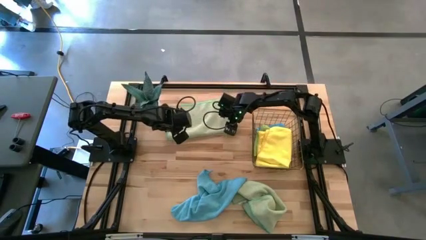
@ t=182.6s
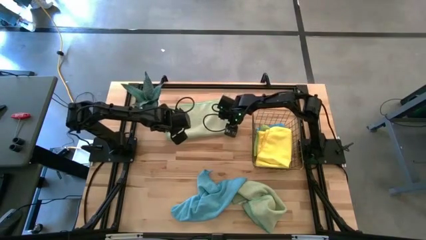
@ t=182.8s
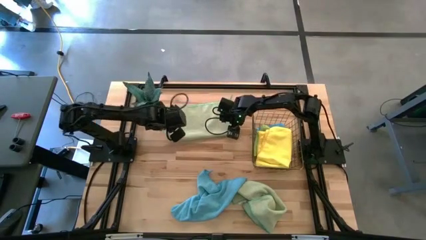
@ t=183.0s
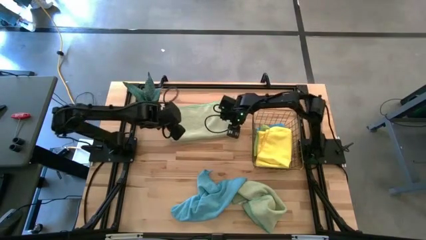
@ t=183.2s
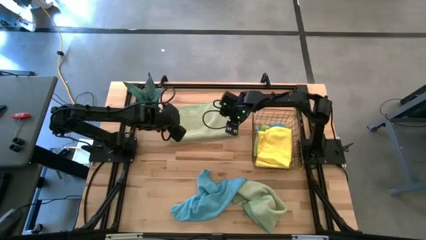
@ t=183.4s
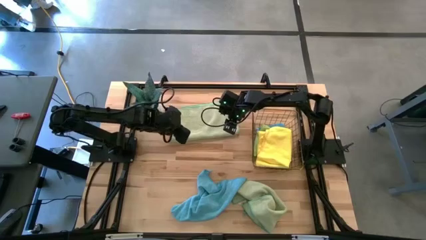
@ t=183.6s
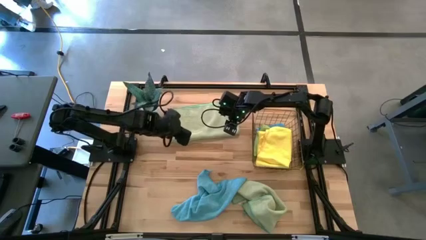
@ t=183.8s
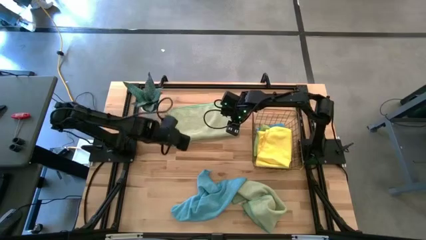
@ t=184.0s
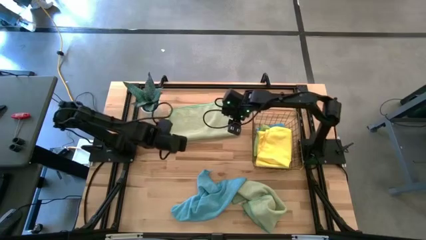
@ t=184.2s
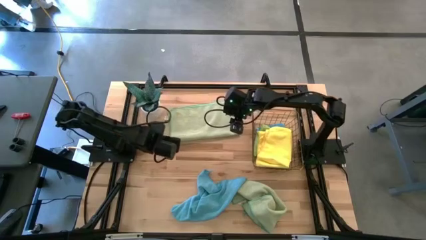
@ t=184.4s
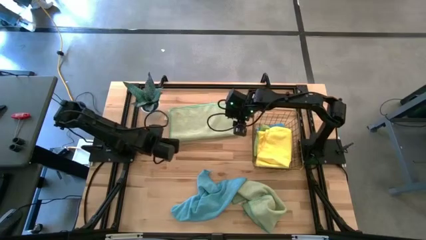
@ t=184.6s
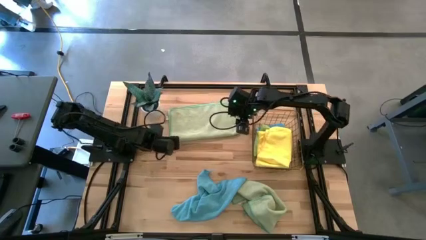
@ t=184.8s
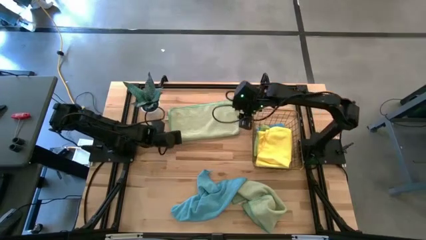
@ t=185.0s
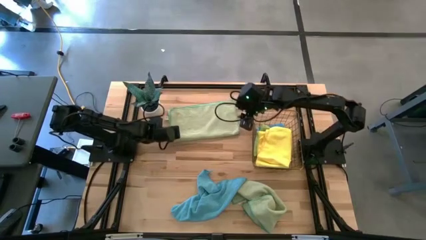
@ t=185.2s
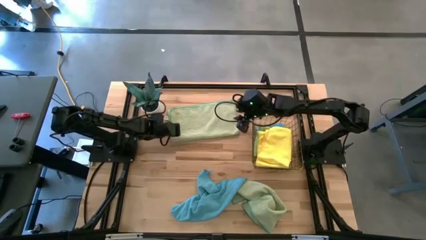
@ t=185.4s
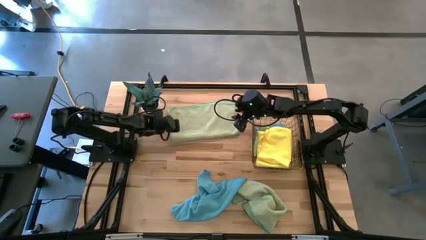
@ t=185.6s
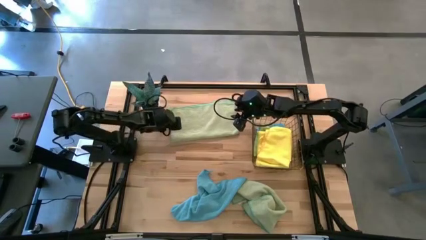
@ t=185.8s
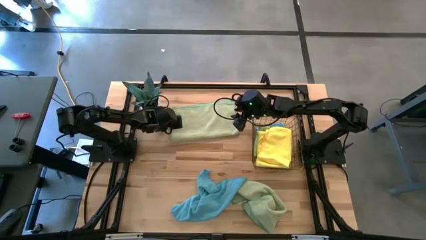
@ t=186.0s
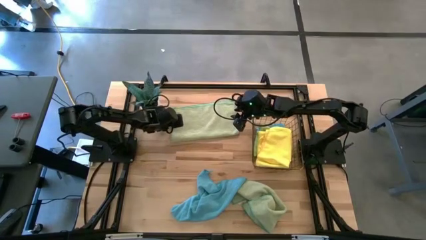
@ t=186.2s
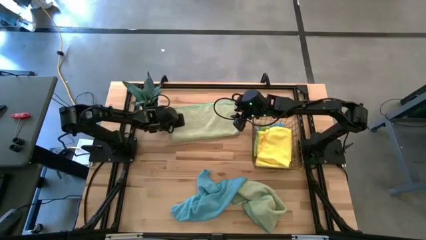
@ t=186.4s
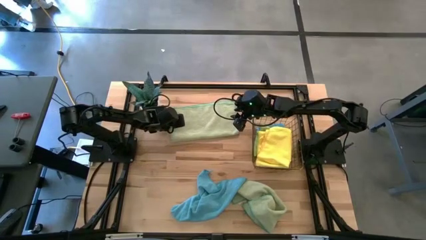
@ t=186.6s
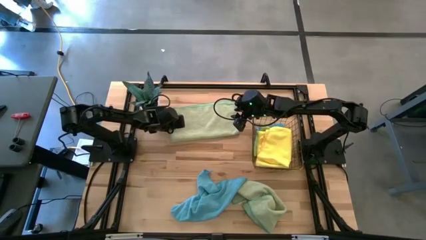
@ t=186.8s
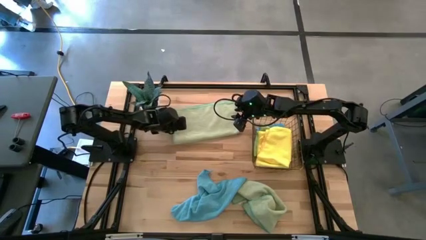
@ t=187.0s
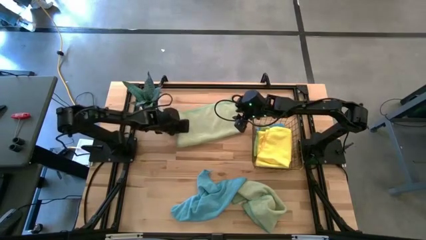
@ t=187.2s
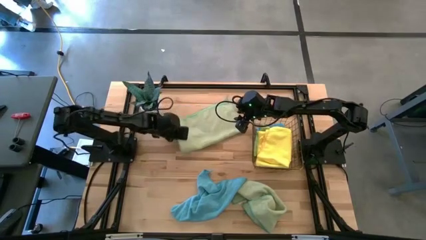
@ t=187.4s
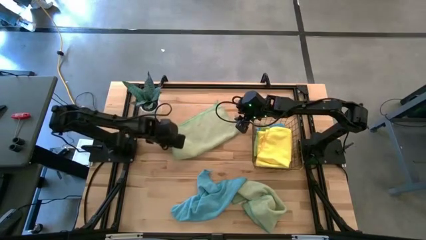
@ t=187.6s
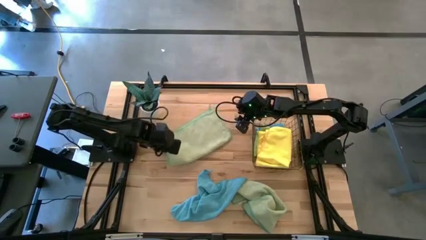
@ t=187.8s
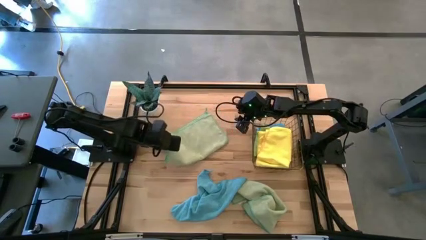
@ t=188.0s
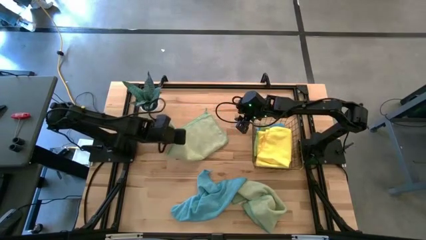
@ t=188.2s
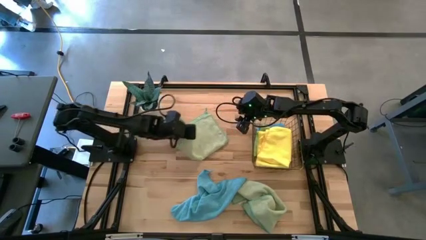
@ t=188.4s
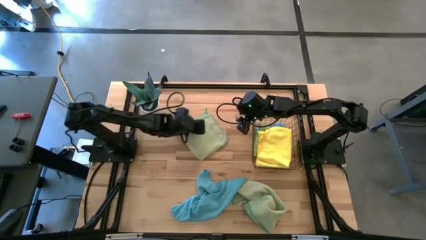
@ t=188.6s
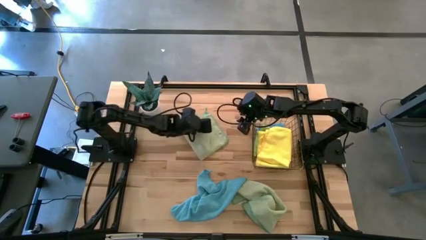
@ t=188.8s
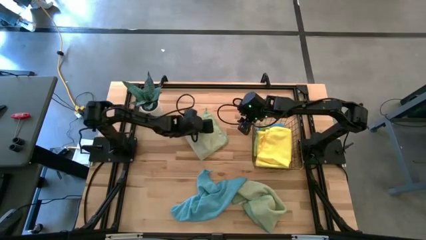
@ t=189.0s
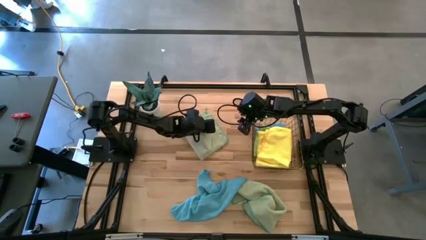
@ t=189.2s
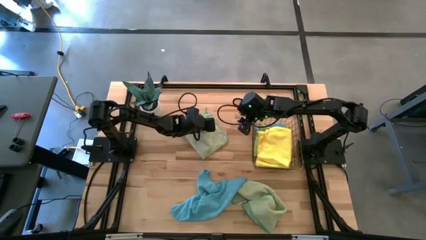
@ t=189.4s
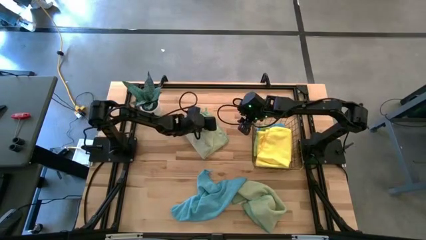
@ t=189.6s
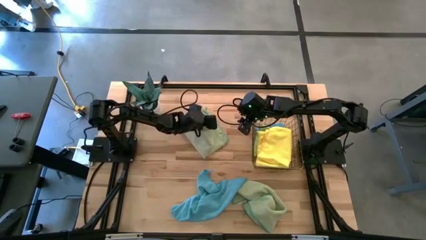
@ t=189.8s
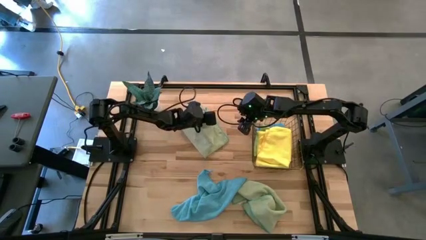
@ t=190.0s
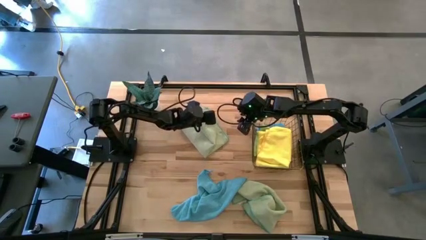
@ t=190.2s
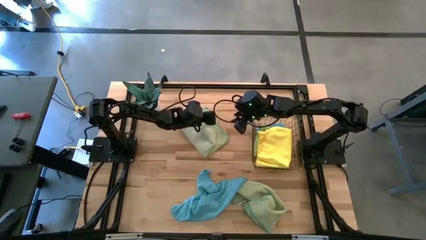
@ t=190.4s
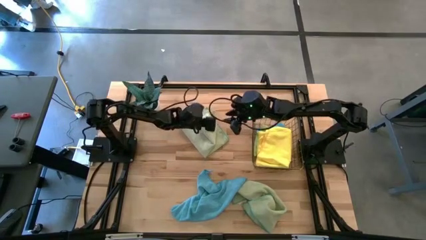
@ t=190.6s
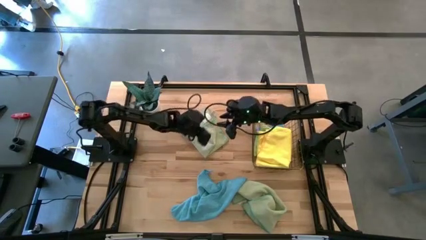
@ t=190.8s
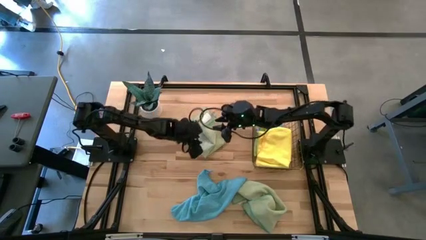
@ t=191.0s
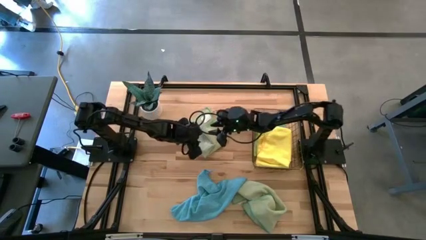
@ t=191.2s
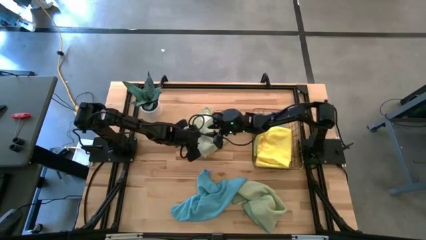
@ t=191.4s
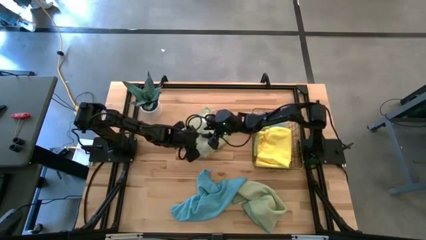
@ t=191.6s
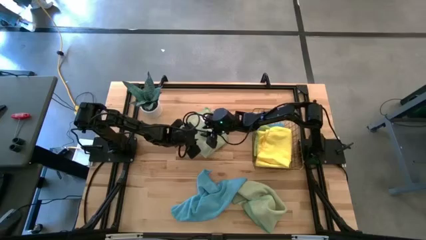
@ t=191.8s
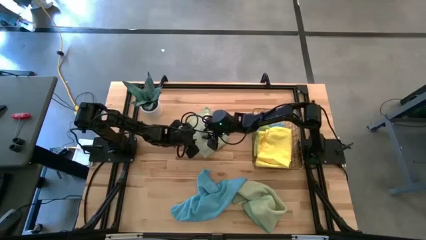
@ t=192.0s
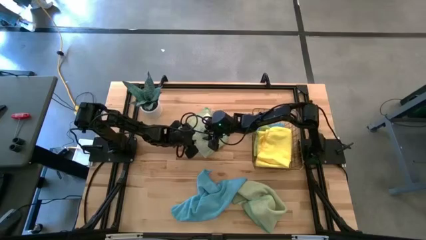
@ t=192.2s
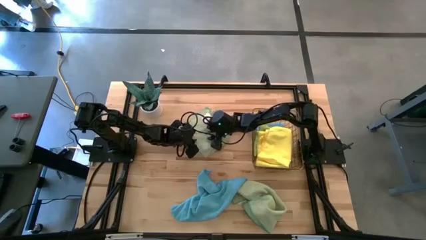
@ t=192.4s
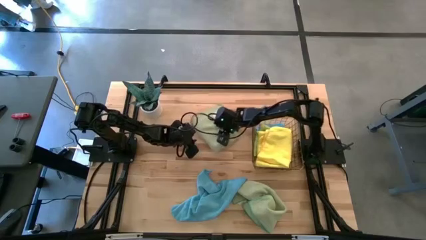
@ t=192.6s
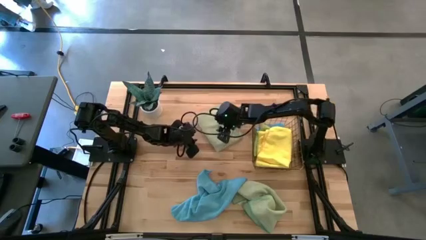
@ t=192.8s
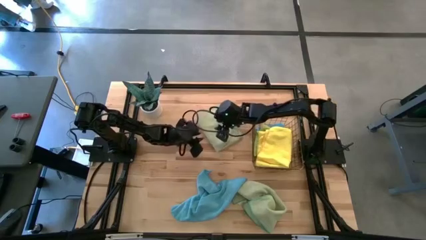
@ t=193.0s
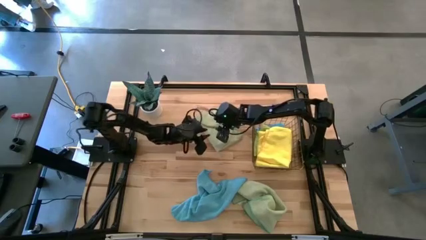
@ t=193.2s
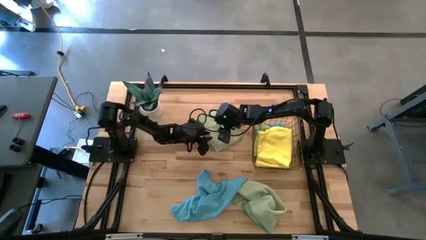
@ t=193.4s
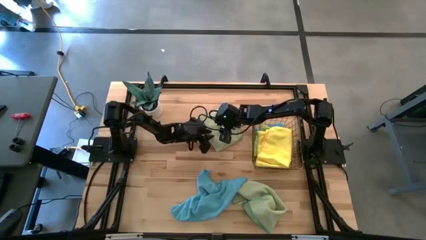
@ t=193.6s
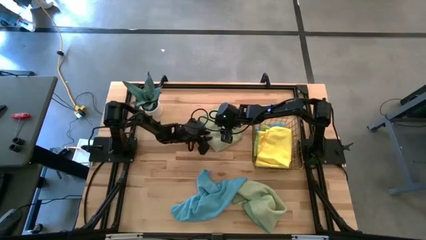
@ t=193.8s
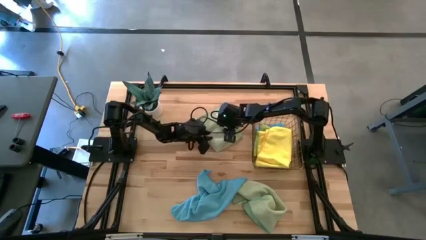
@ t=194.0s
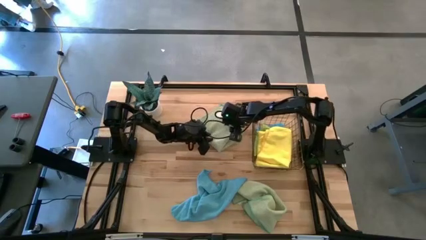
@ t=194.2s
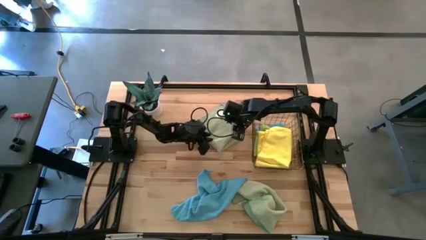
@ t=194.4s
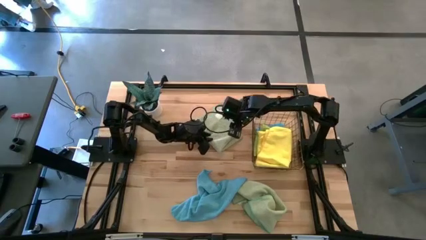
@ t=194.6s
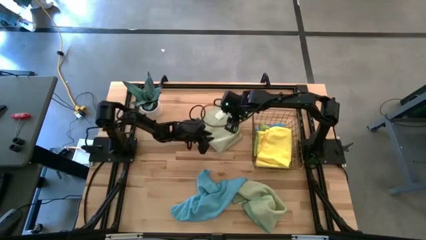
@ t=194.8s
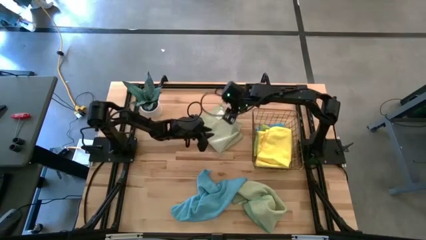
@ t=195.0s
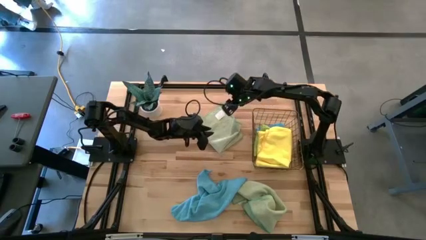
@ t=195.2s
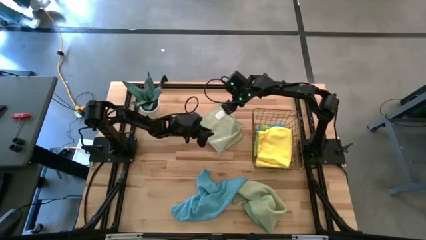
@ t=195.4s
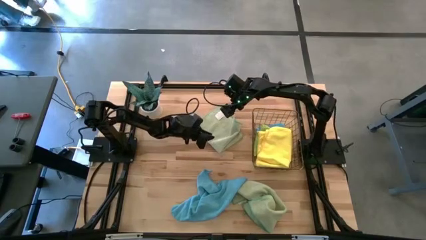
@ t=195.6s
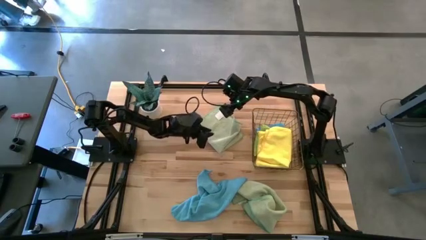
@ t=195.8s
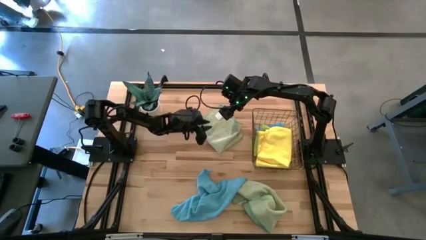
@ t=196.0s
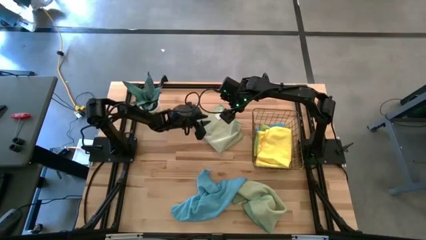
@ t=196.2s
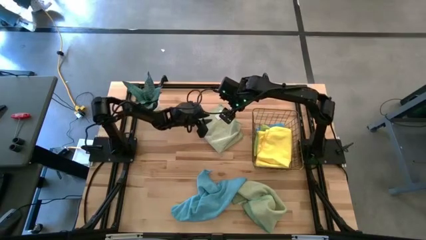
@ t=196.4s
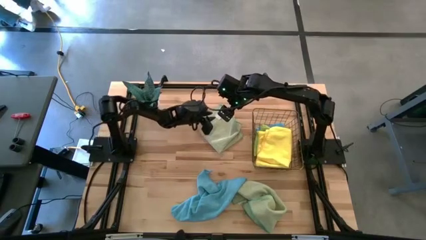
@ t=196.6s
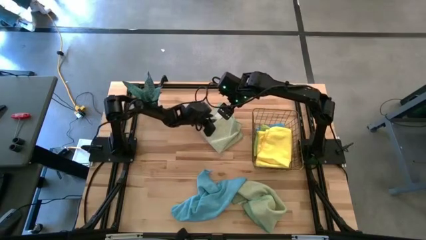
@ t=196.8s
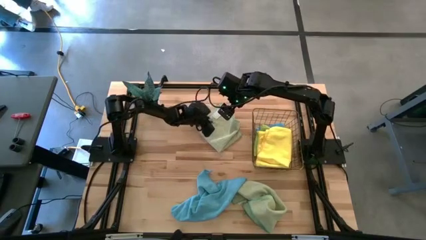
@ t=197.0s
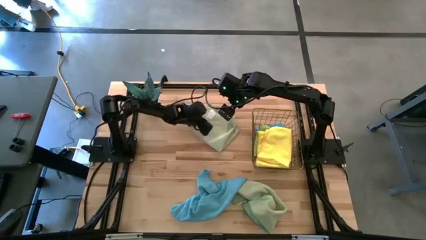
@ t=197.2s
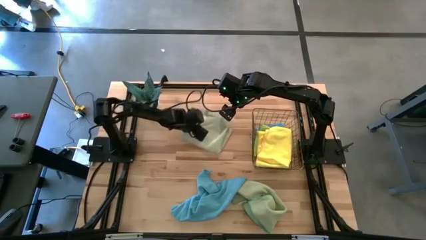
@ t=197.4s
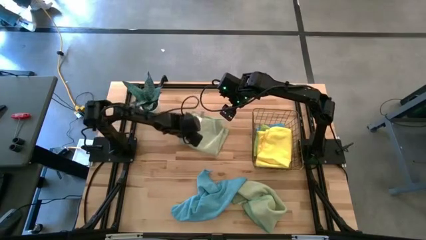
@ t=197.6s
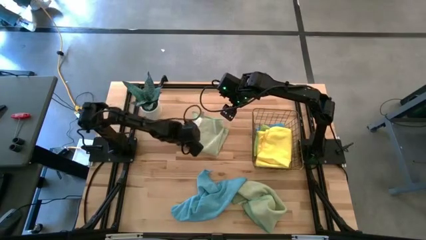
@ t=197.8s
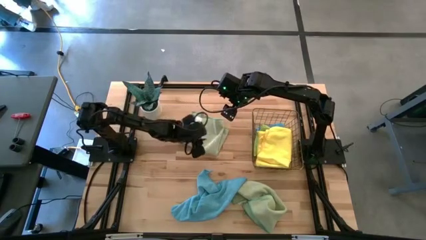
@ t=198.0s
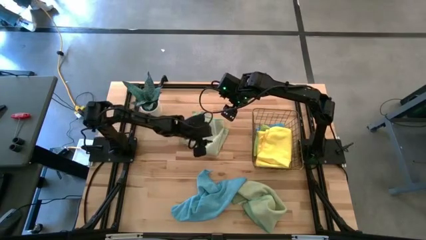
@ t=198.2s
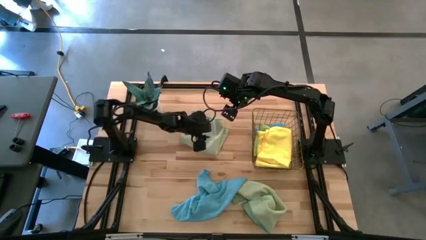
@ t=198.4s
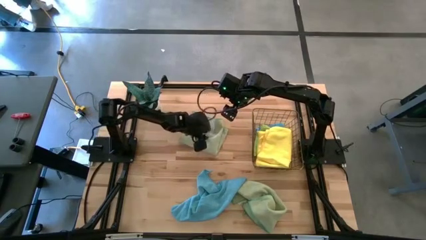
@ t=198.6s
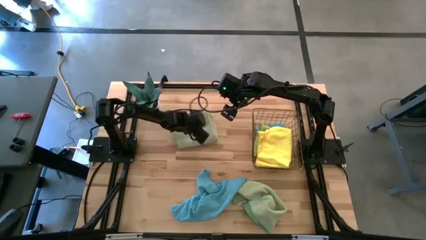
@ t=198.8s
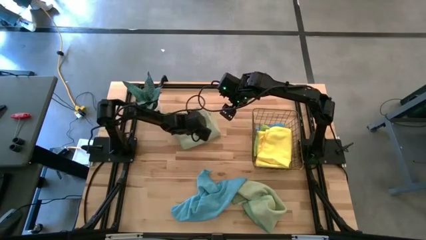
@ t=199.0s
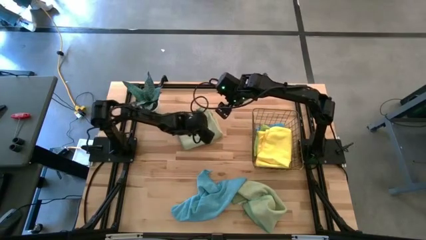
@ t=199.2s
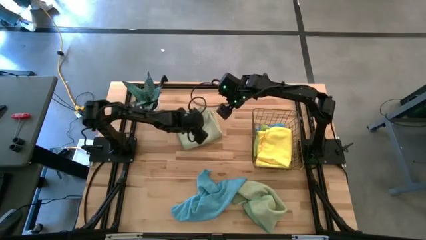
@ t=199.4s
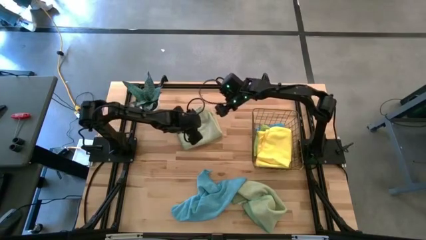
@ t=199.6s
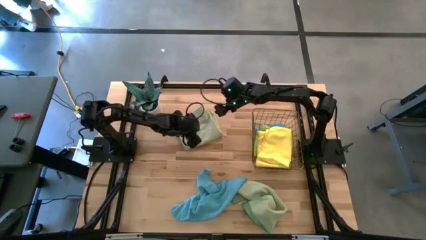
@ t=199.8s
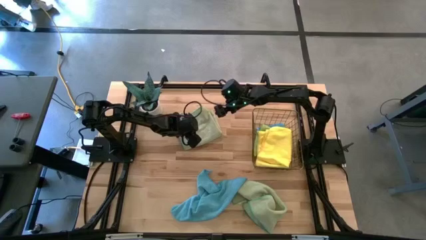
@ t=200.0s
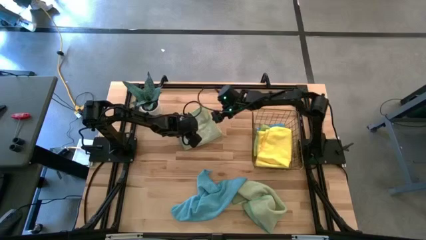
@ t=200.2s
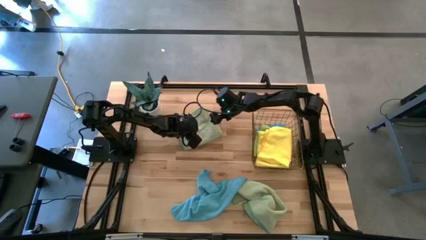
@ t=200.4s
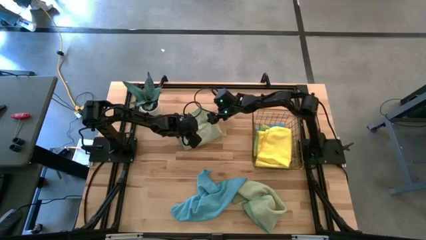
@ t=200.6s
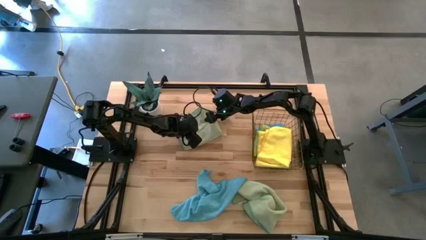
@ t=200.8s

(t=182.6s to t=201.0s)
Task: Fold microfiber towels
Fold the left green microfiber cloth
